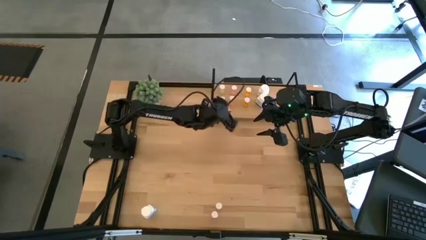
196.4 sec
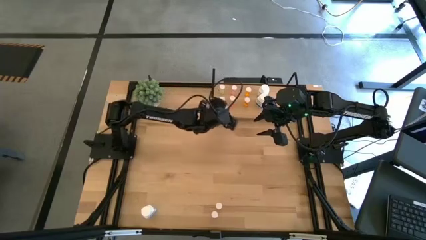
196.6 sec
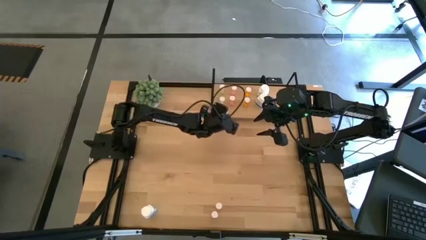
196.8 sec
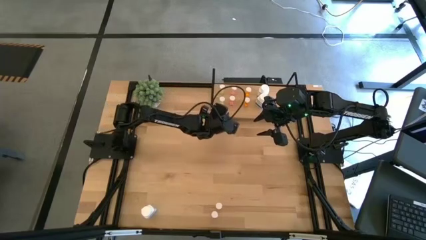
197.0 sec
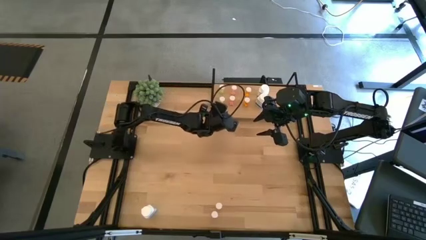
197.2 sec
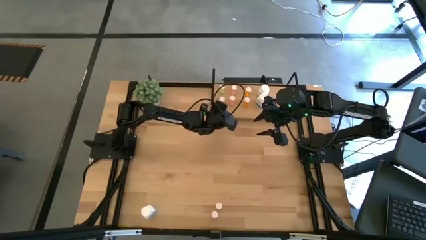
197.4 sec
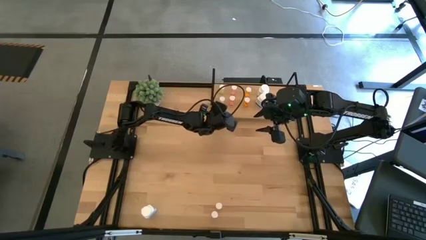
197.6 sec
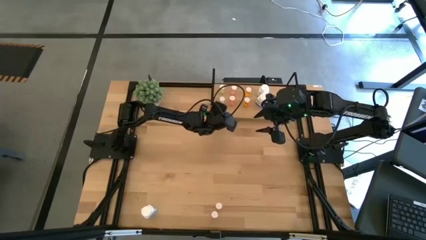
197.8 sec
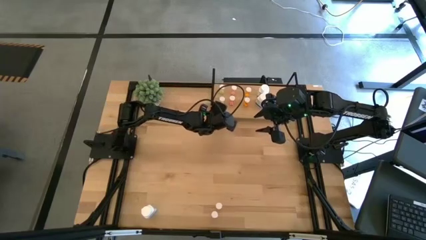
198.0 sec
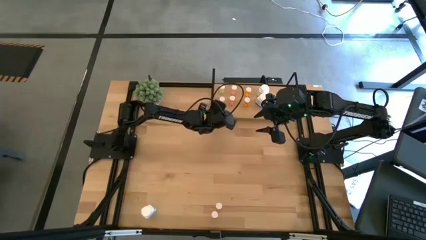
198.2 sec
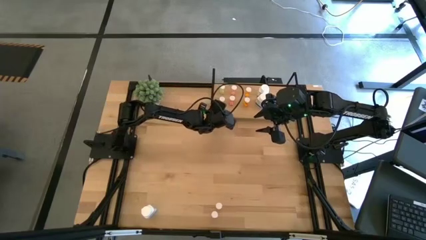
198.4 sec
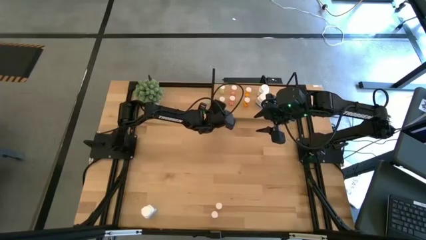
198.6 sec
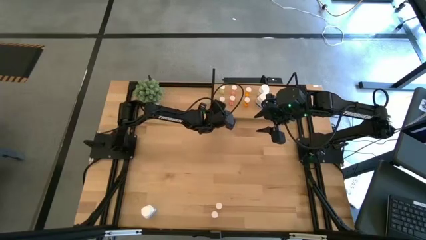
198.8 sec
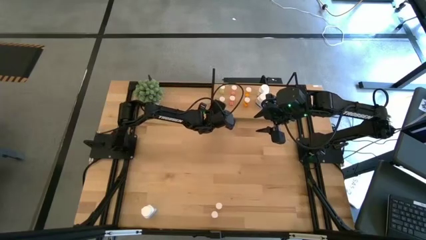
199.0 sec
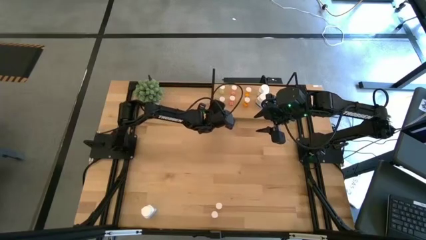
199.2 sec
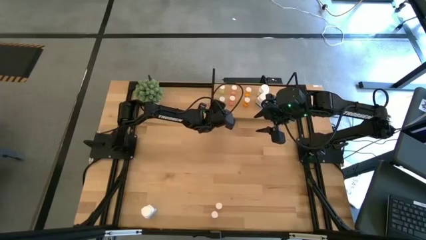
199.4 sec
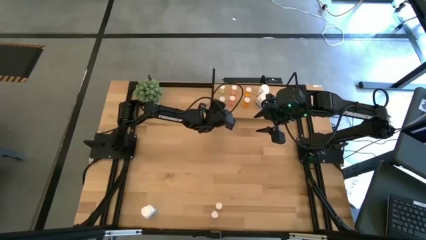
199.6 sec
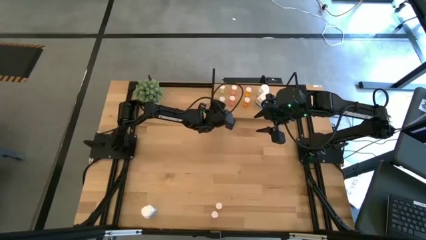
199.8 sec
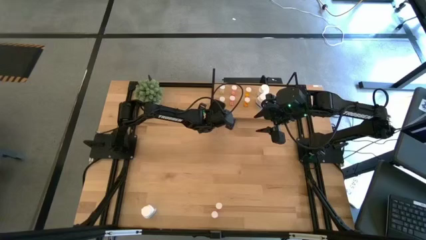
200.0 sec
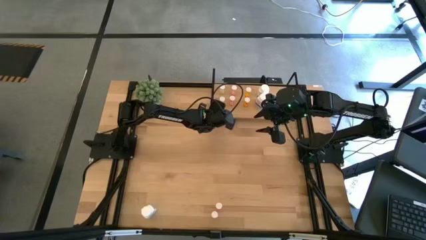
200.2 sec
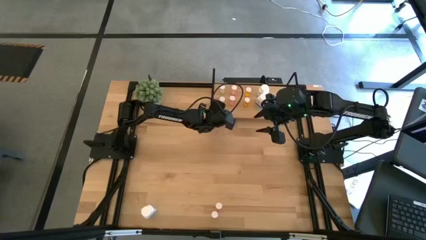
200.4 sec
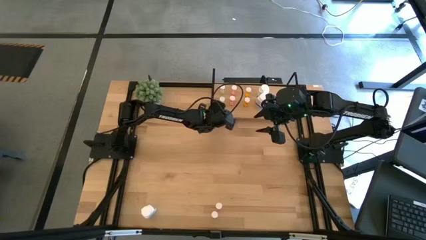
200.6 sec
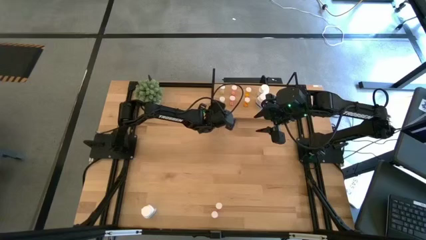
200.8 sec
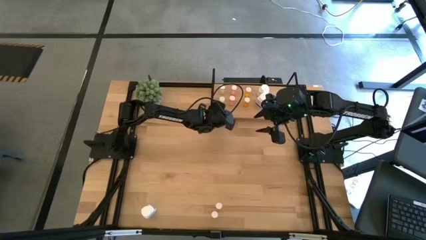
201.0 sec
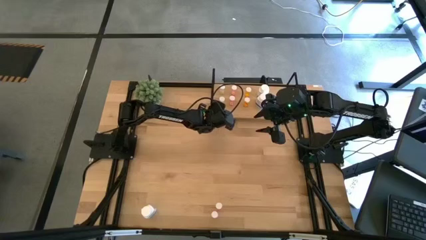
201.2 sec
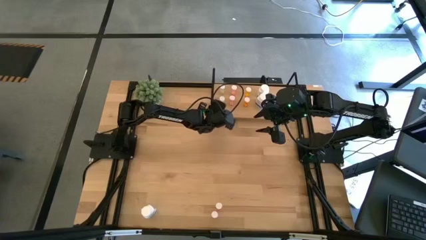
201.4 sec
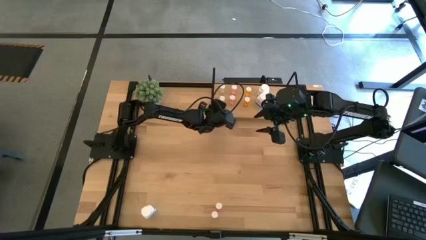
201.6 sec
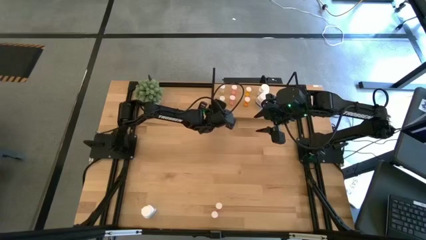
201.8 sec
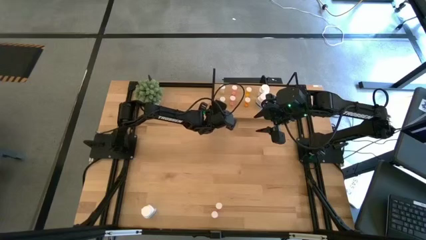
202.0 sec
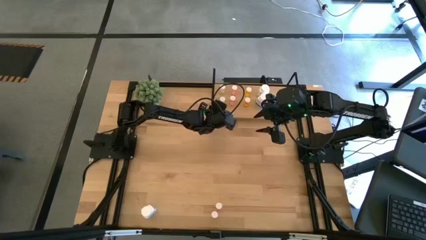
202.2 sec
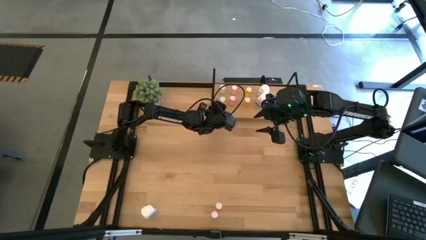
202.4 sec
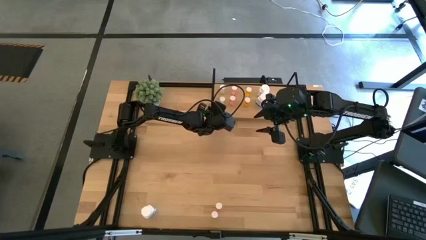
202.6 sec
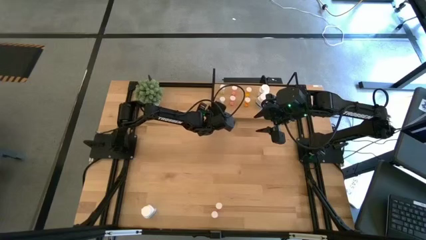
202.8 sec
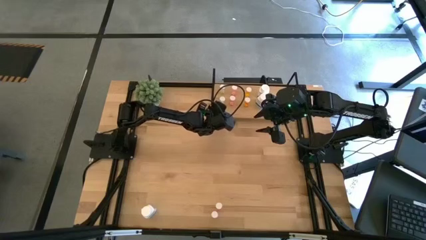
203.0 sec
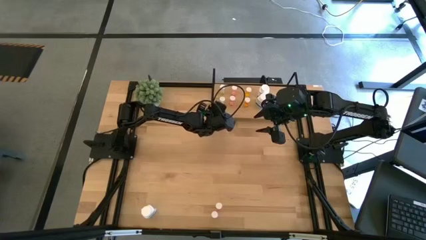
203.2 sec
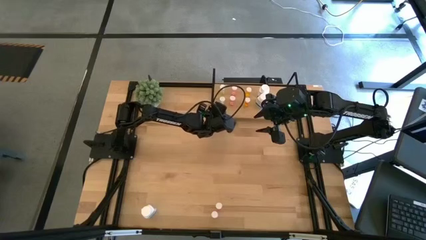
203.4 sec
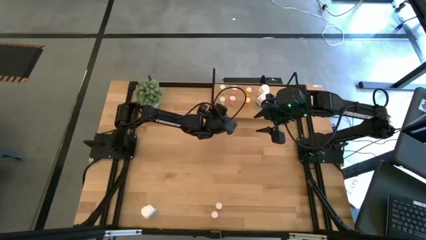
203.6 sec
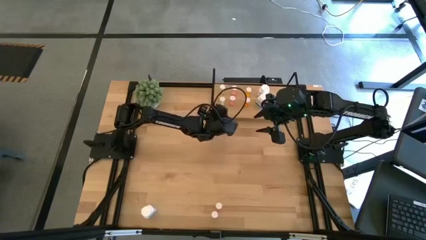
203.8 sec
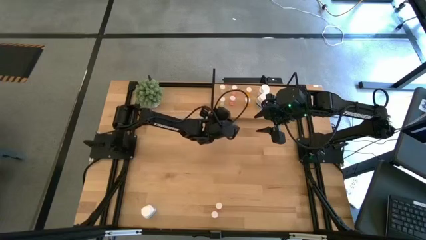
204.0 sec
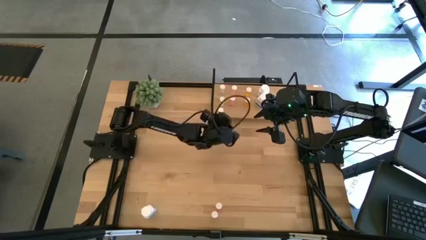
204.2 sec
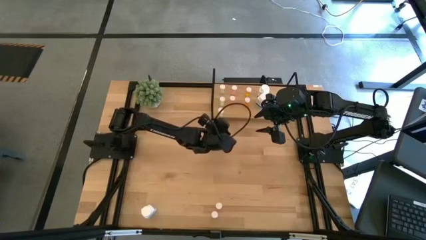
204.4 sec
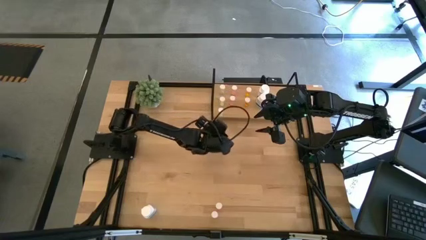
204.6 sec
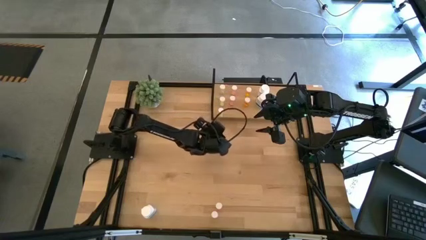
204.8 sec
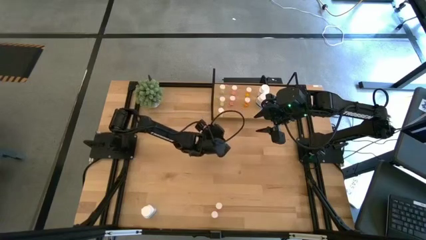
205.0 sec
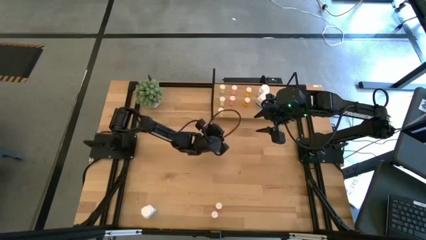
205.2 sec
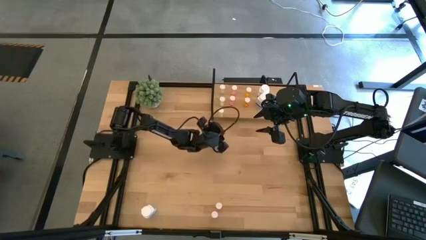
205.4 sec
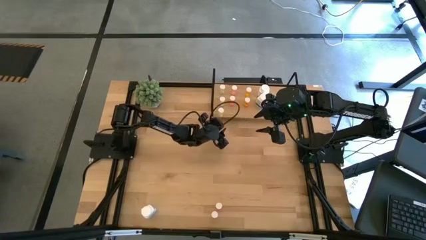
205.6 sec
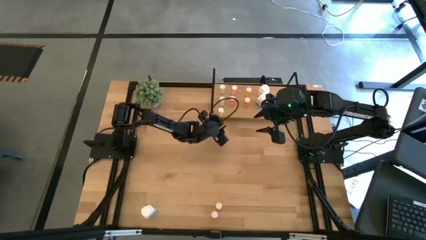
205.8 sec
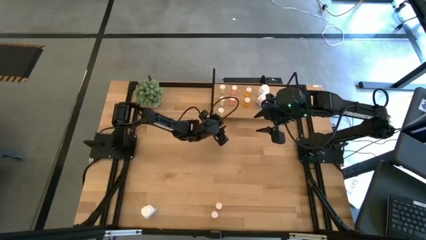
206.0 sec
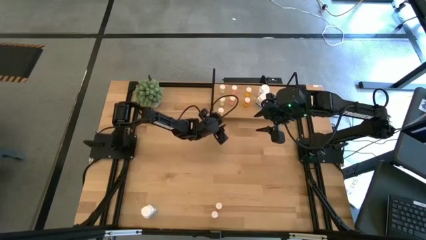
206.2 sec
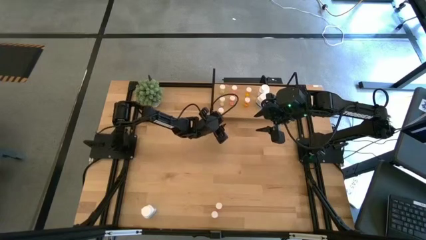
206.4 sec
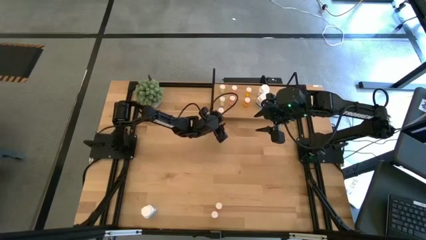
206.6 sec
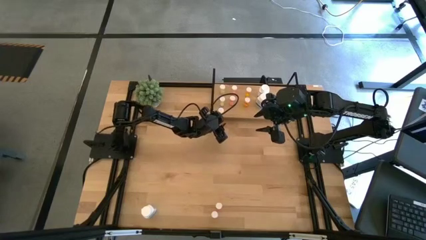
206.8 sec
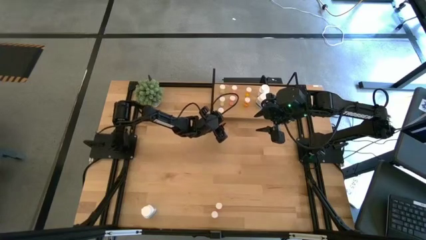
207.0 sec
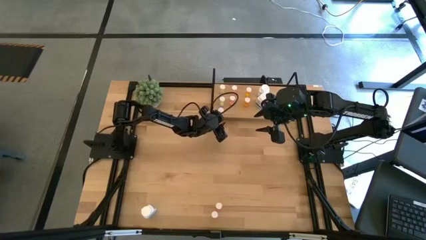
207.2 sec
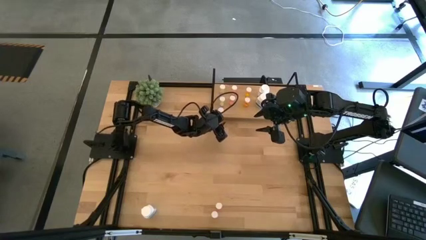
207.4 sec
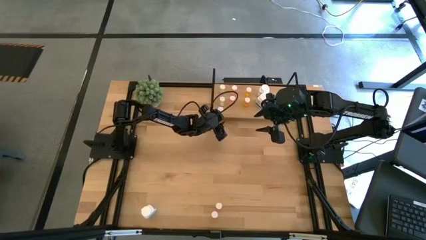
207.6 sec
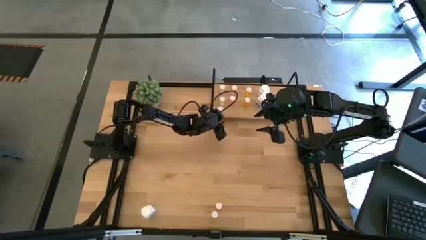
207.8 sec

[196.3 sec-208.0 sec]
Task: Pick and place medicine bottles onto shelf by color
Put the yellow pill bottle on the shelf aligned with the other yellow pill bottles

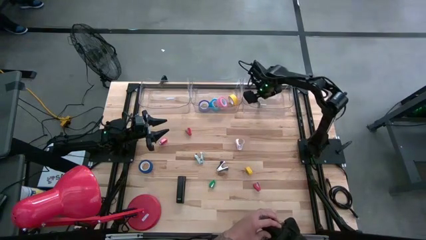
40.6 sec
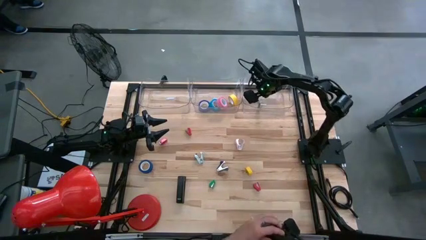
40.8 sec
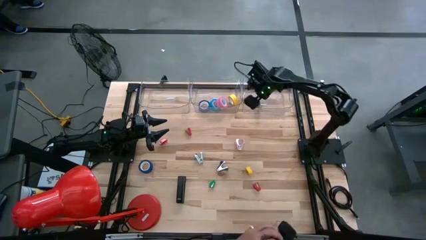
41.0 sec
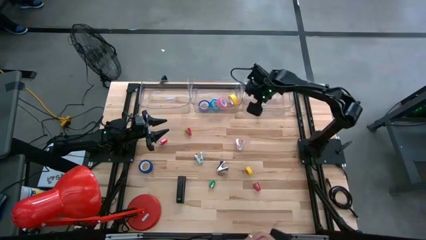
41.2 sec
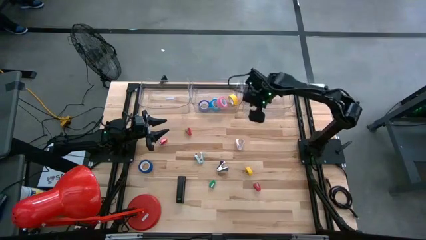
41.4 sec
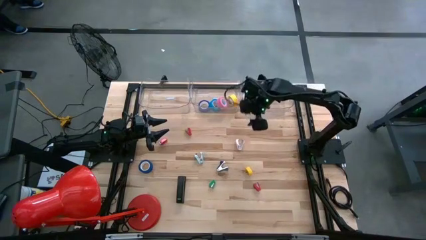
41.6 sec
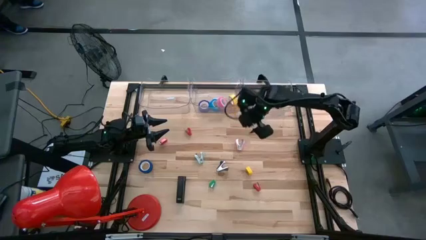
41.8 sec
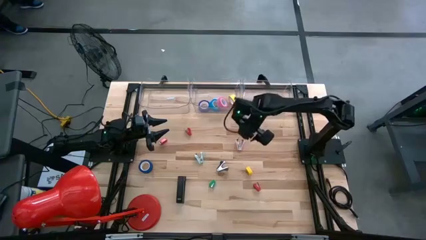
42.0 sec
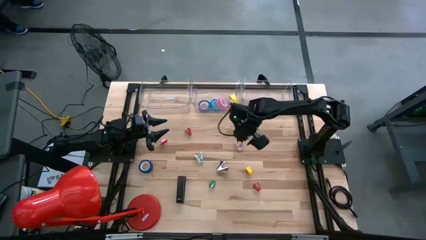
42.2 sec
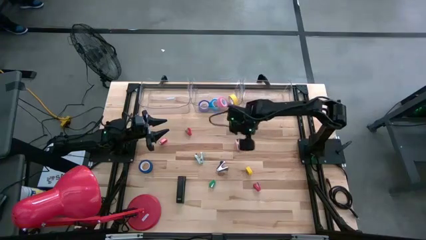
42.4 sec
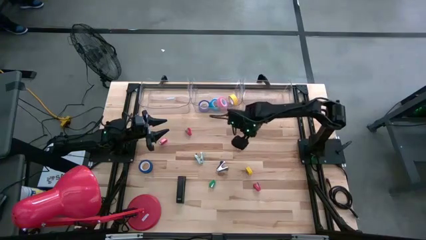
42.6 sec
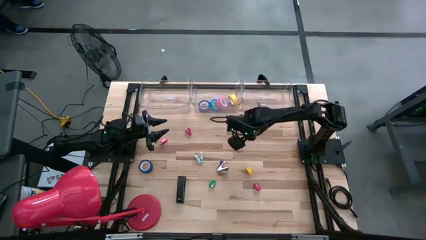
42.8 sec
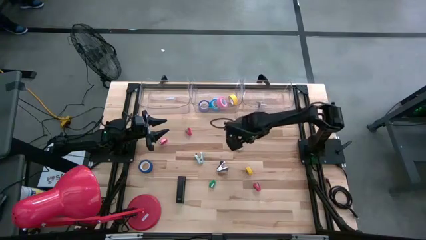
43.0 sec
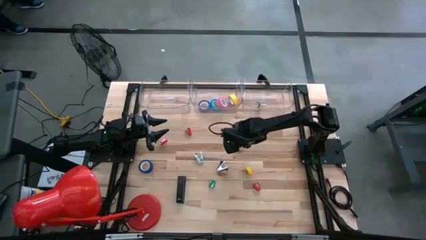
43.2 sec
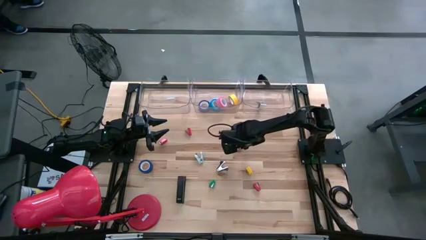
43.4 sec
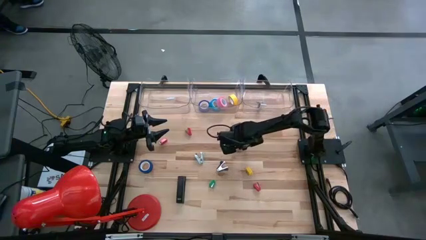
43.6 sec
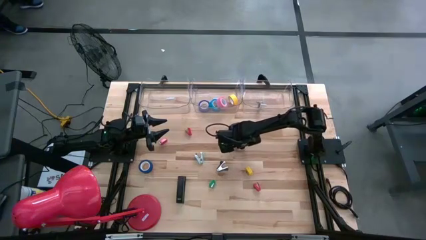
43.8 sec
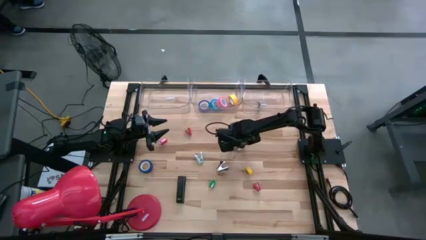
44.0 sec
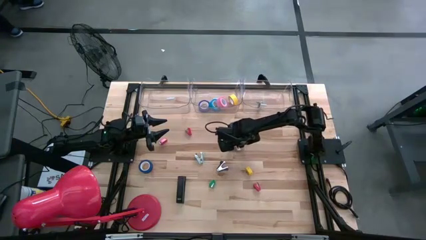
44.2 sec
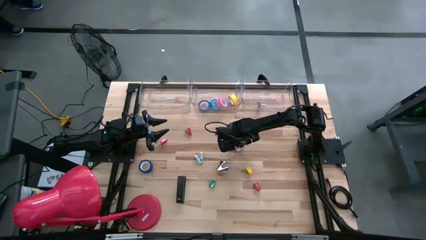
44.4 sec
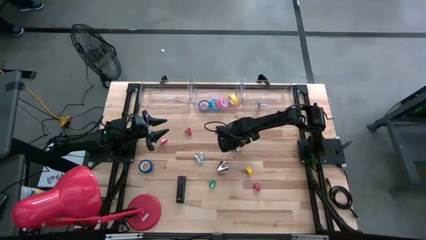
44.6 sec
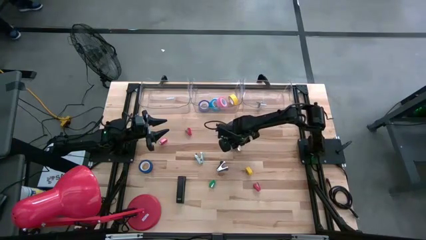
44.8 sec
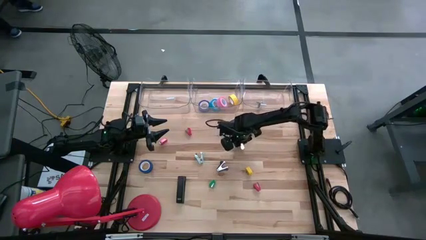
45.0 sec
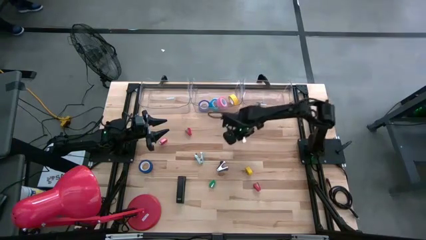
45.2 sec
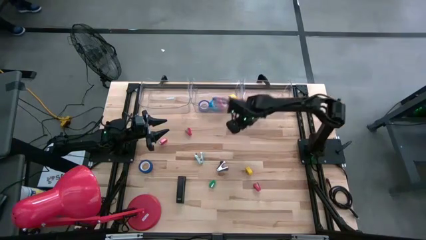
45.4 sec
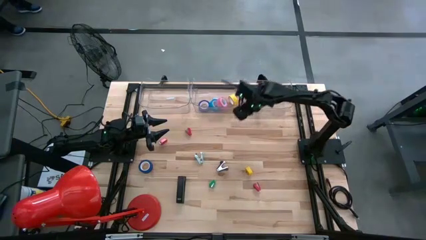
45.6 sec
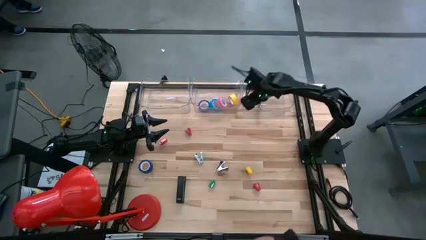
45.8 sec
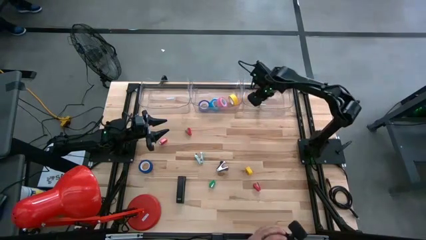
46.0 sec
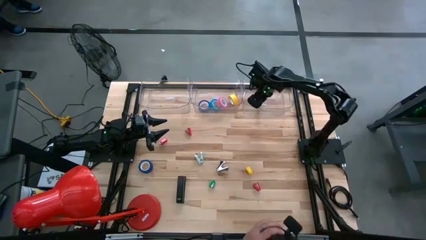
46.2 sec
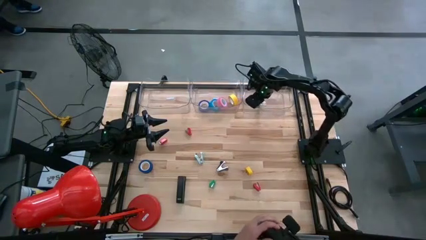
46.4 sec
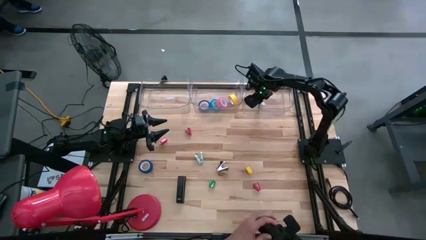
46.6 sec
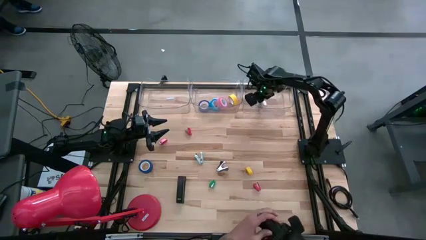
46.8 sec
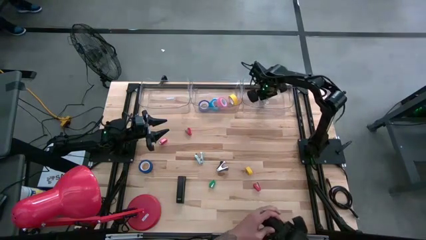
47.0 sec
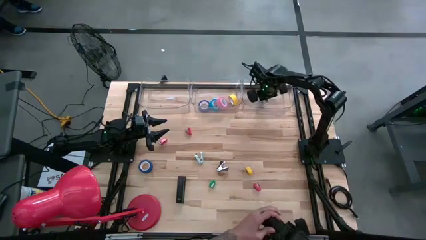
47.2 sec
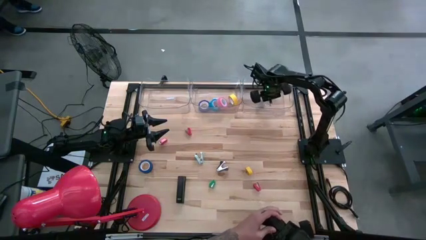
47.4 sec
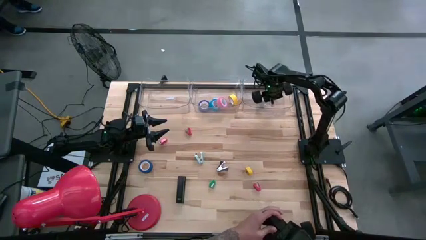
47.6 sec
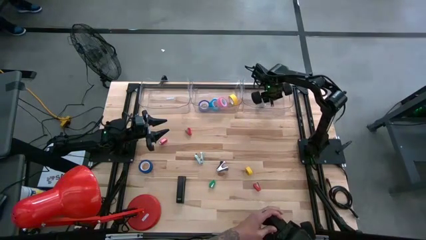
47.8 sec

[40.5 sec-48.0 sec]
Task: Pick and place Stapler, Stapler remover, tape
Put the pink staple remover into the right transparent bin
